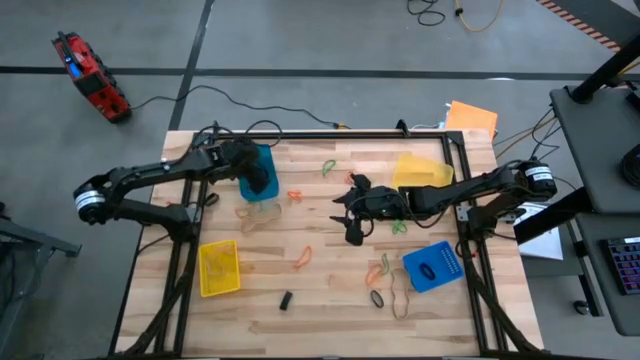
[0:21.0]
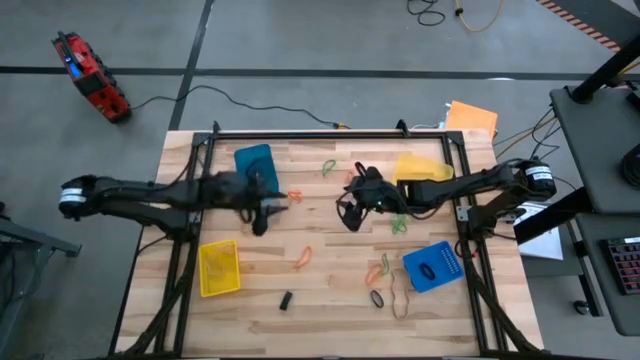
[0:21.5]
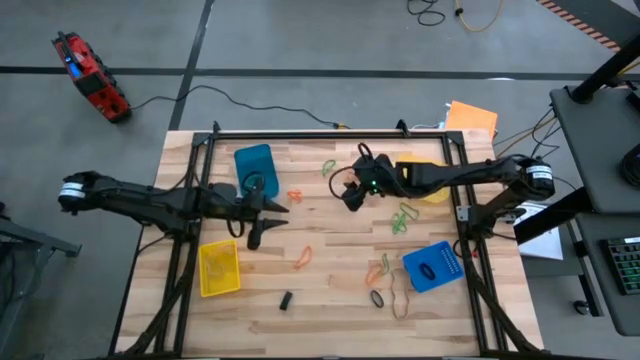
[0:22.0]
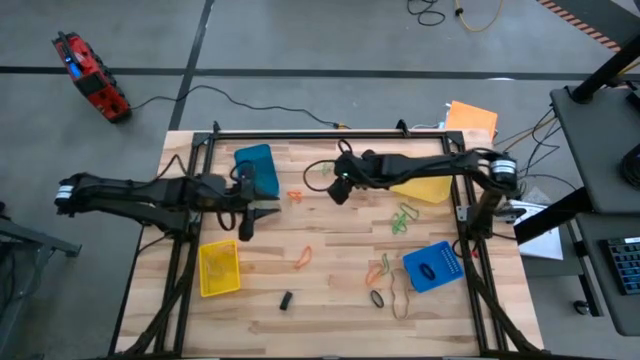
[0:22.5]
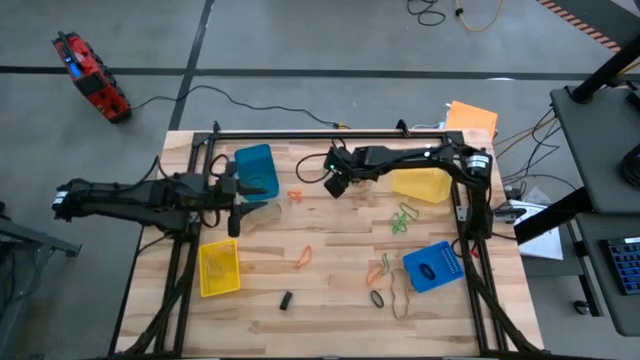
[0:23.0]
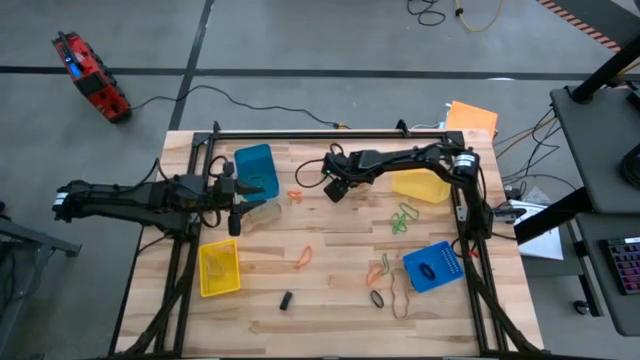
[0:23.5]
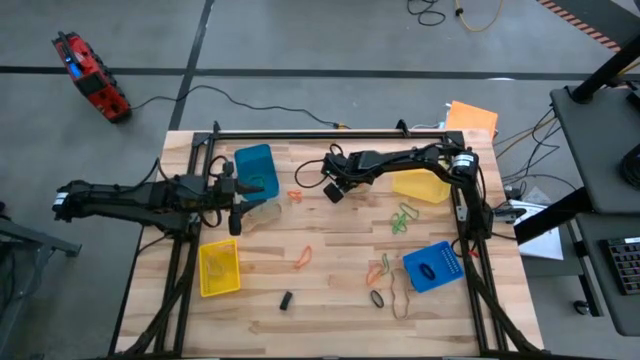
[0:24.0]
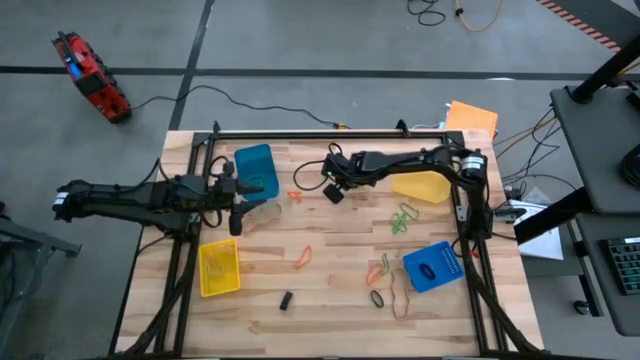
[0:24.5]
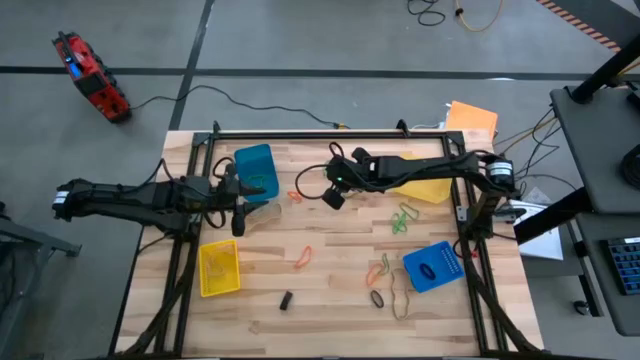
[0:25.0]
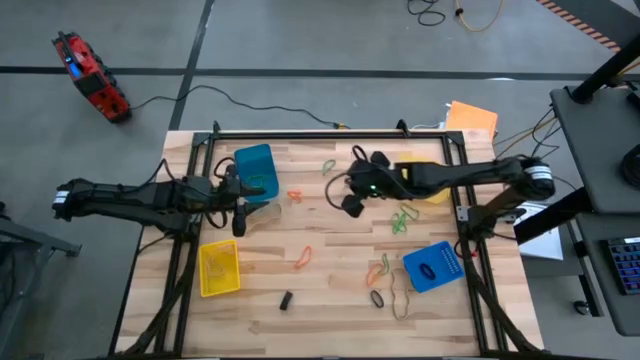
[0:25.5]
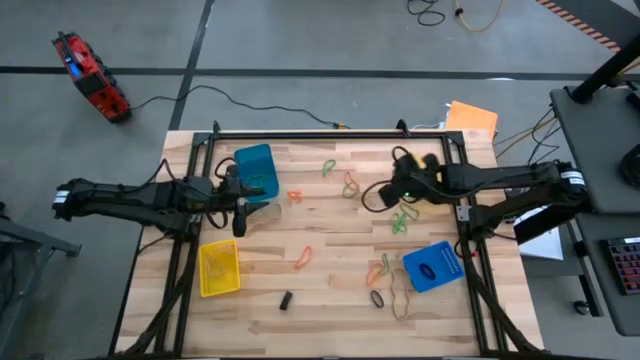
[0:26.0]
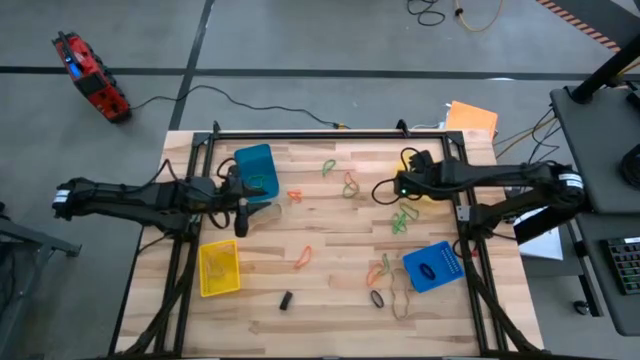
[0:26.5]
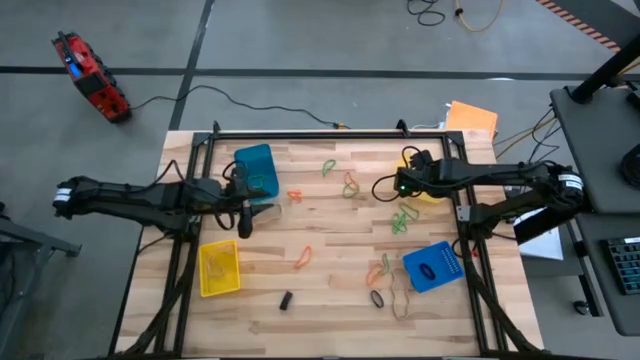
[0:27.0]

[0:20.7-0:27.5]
Task: Sort rubber bands into baskets
Put the orange rubber band into the light yellow bin

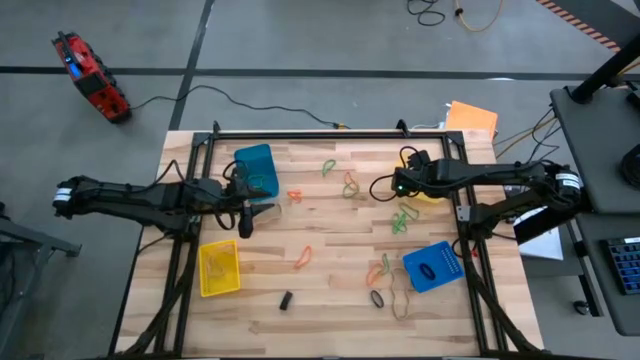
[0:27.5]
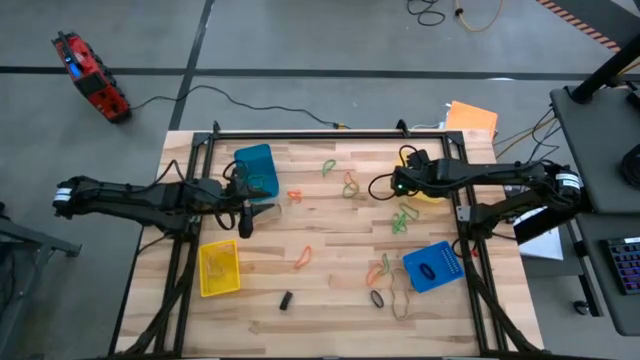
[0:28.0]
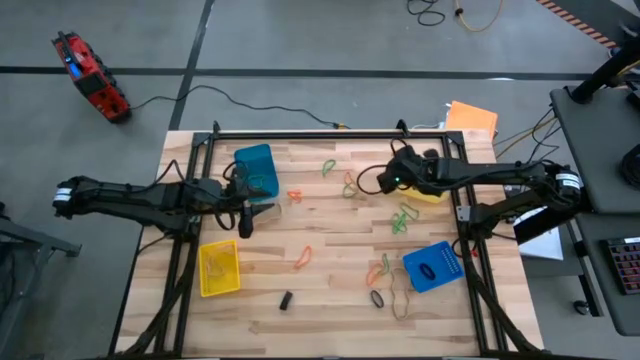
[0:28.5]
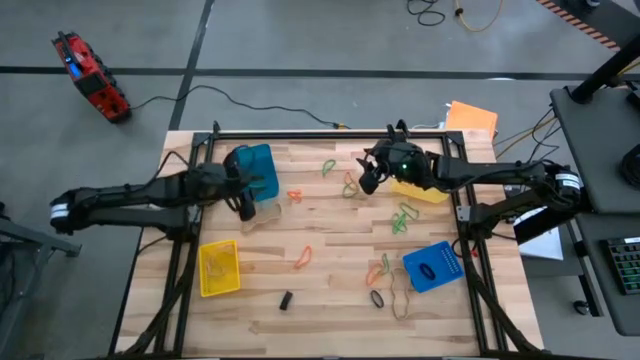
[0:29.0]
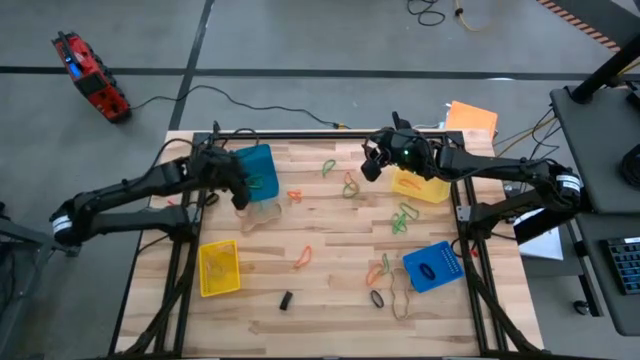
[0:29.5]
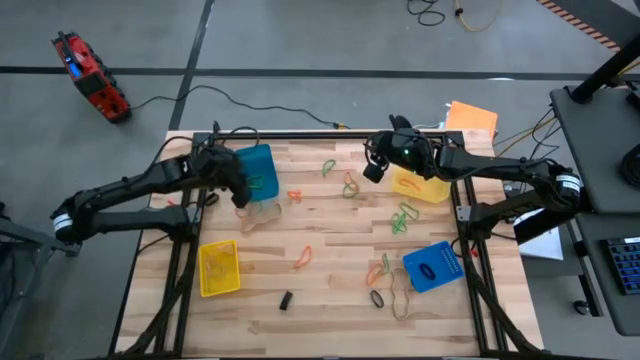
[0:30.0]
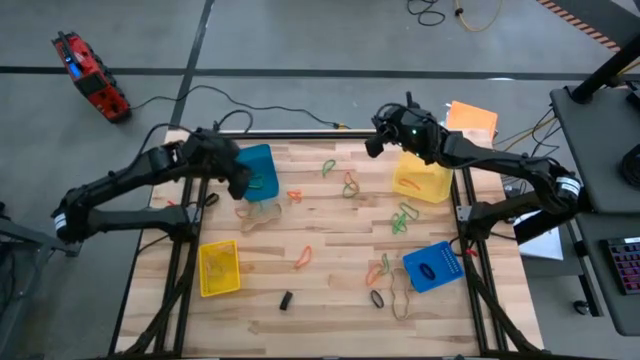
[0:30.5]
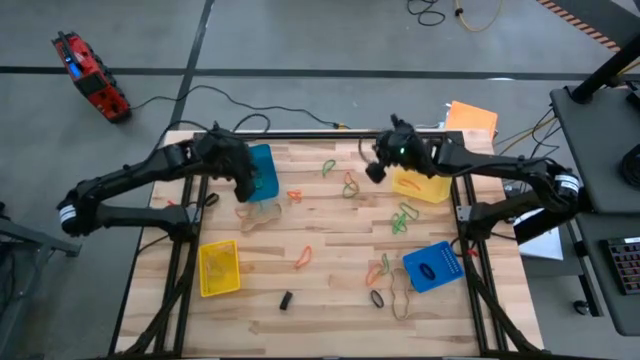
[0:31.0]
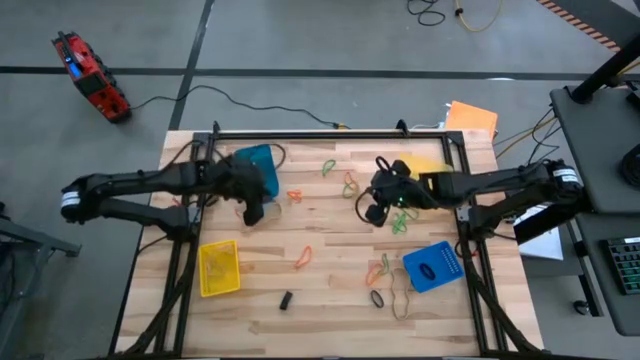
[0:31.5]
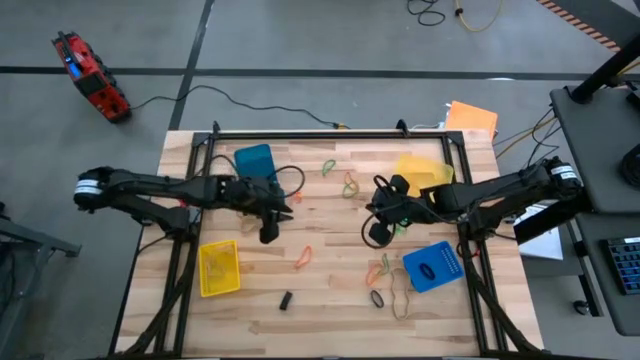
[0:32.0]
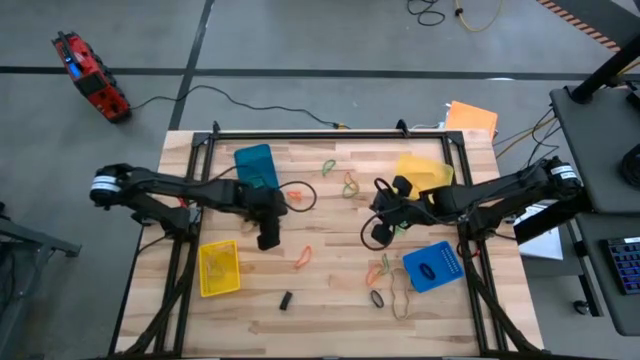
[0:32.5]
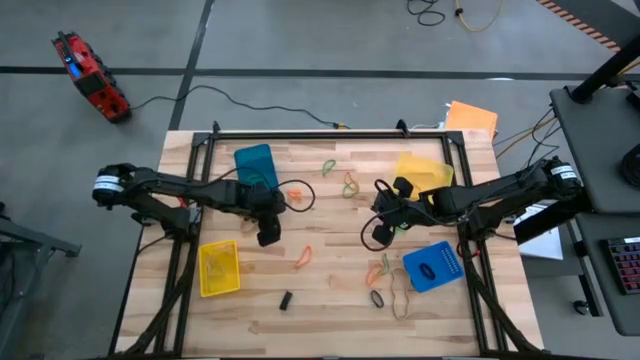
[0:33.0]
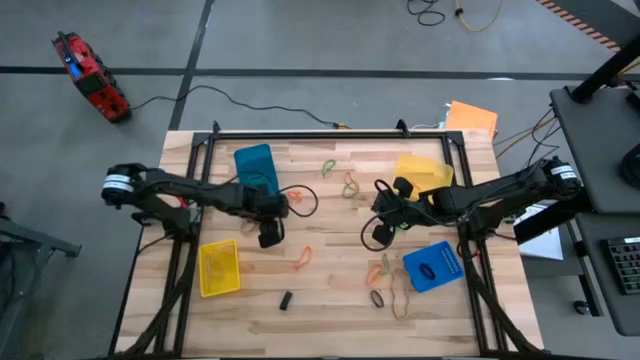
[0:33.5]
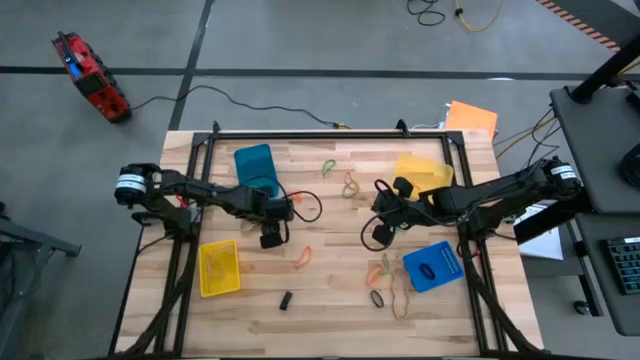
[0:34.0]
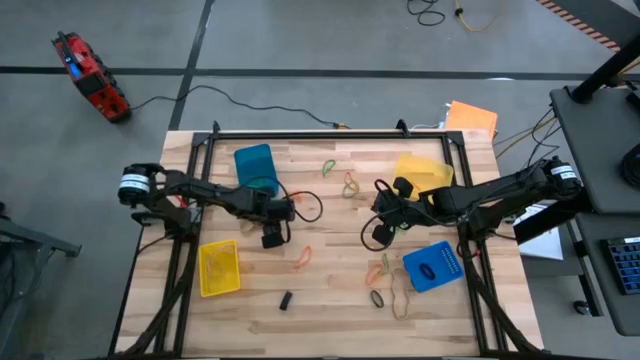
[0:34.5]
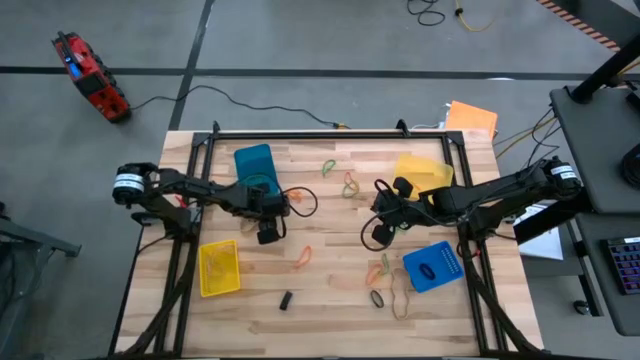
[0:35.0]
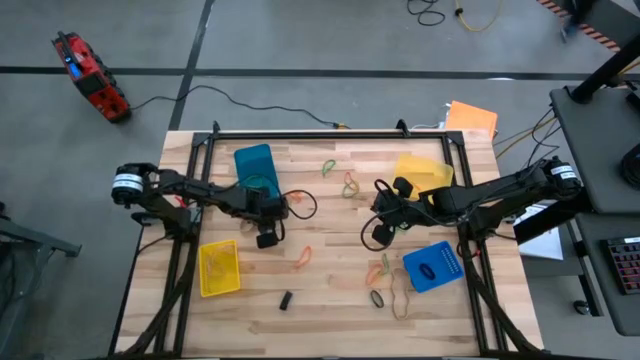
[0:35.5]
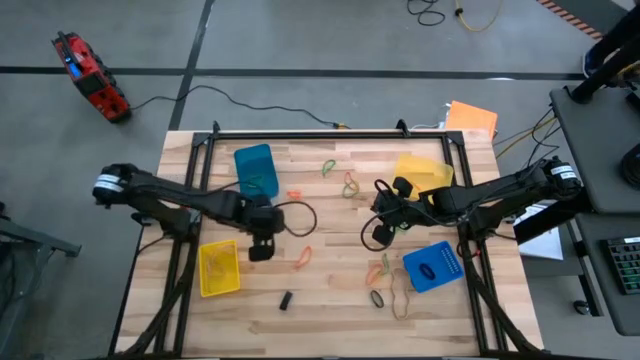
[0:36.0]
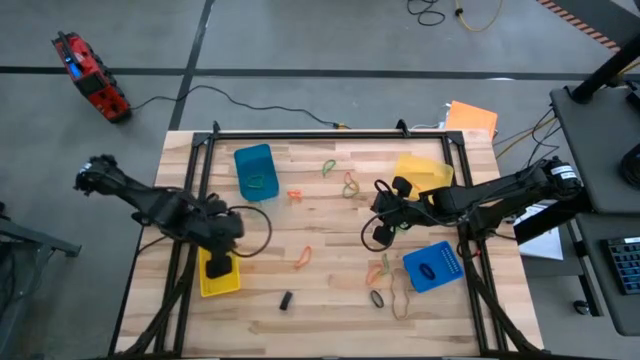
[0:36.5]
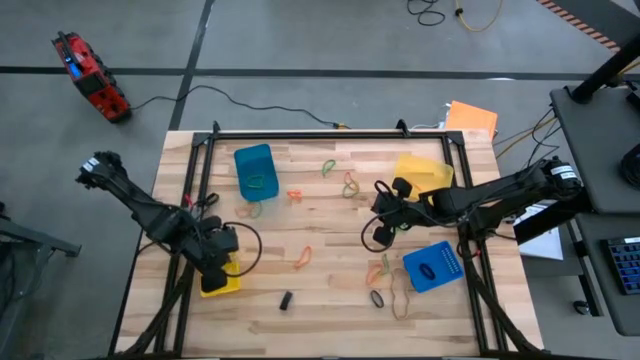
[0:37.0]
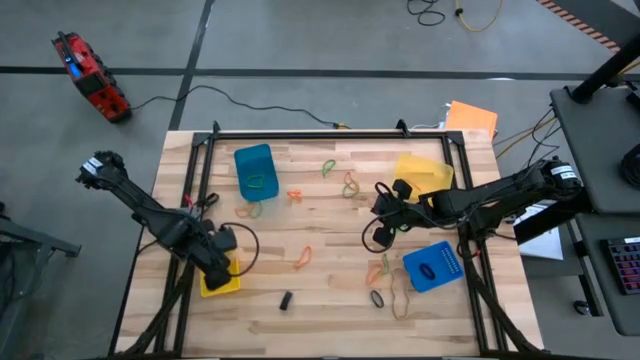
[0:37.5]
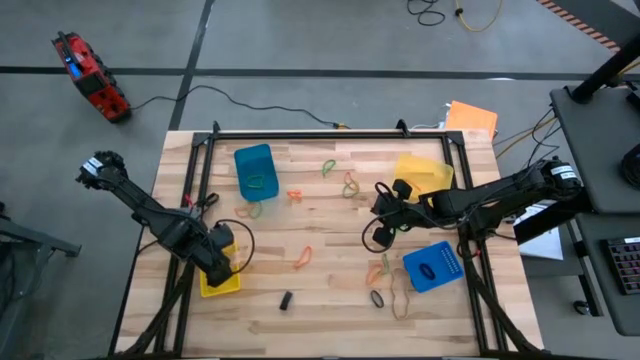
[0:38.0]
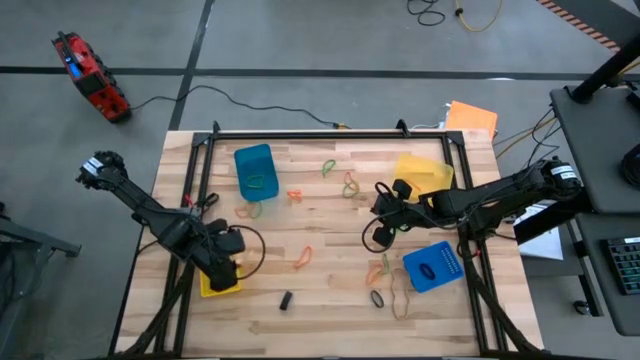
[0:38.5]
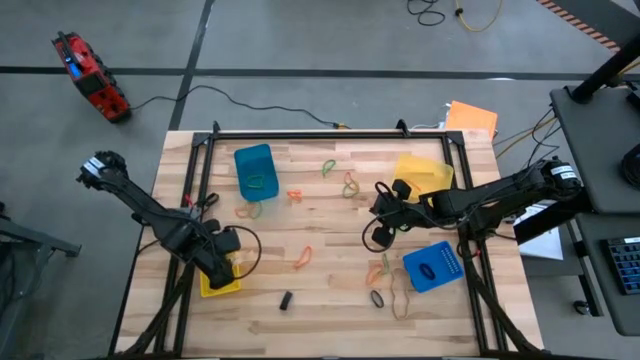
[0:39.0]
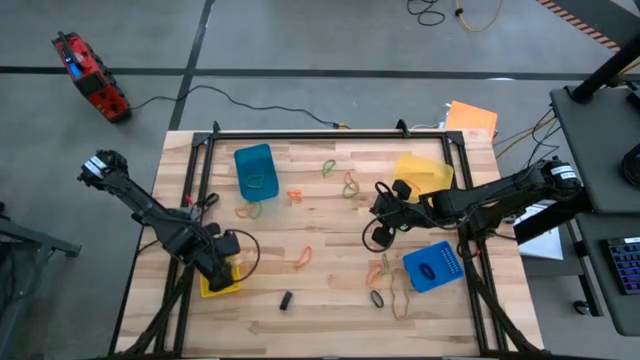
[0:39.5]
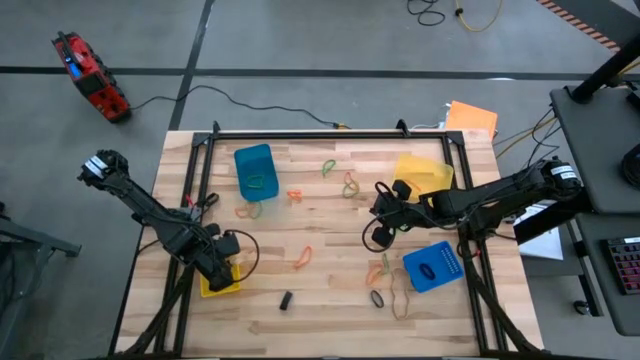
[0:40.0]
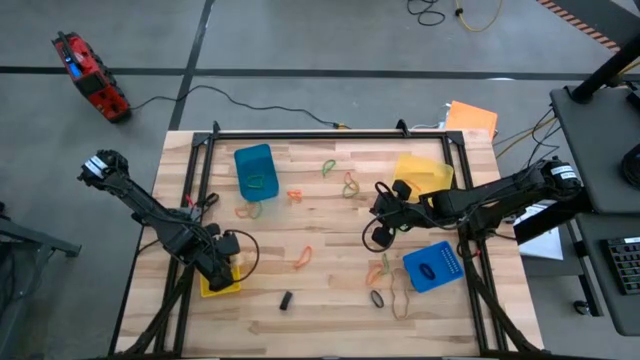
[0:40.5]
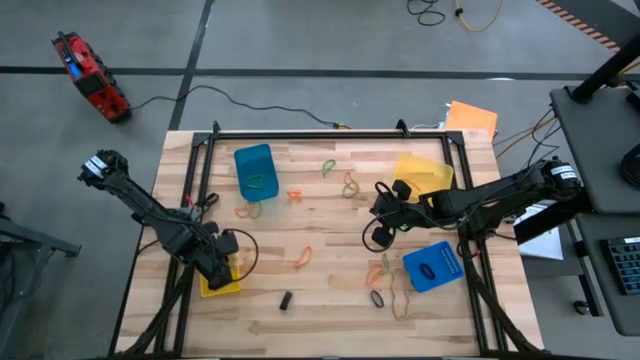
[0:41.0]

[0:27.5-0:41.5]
Put the brown rubber band into the bottom yellow bin
